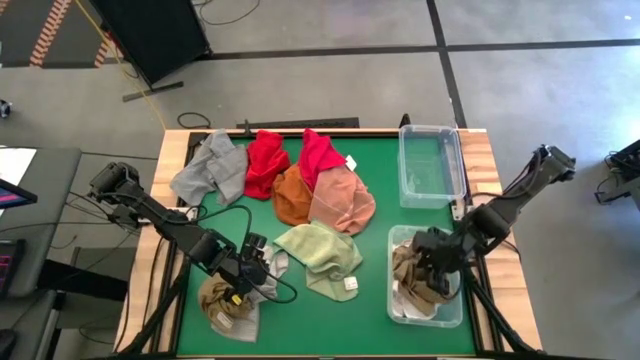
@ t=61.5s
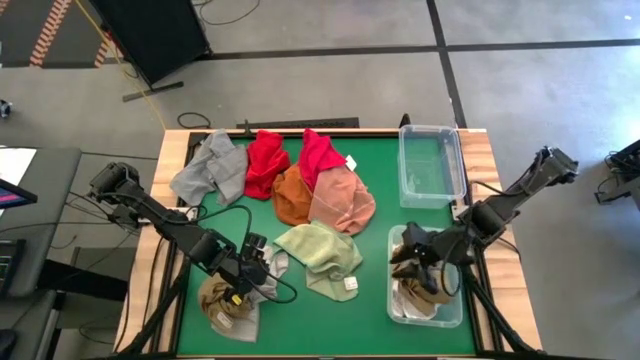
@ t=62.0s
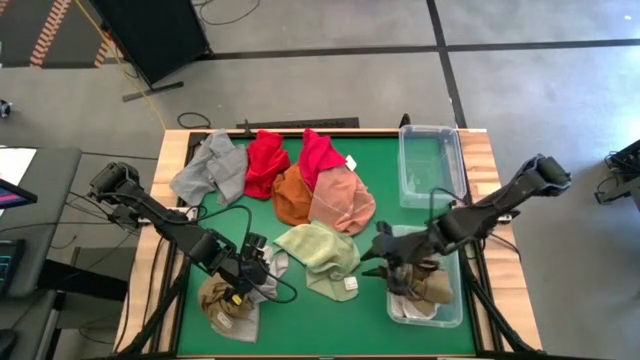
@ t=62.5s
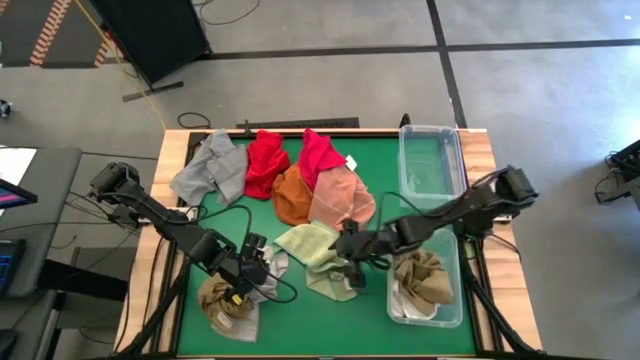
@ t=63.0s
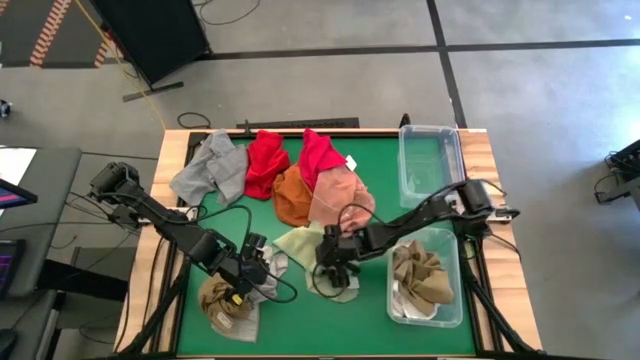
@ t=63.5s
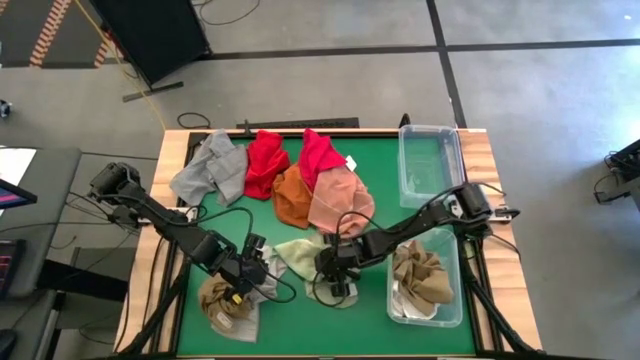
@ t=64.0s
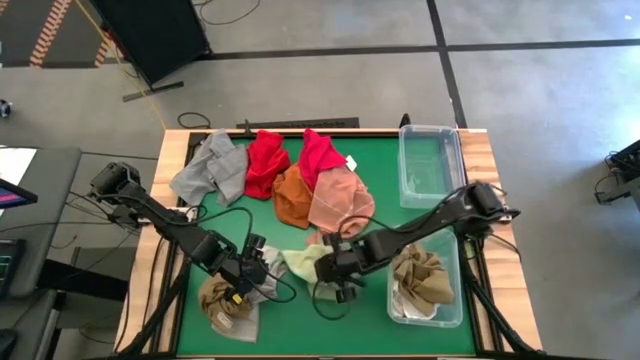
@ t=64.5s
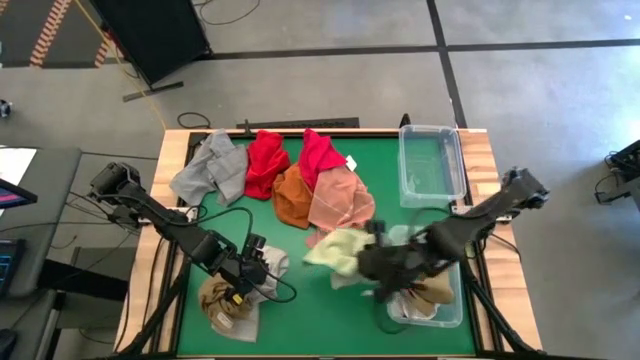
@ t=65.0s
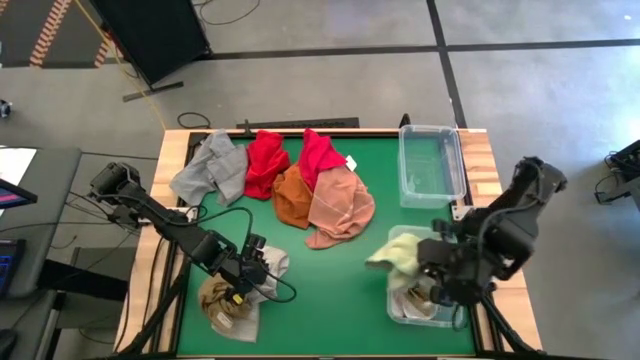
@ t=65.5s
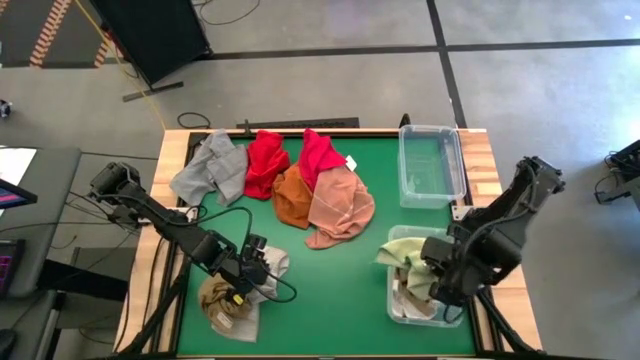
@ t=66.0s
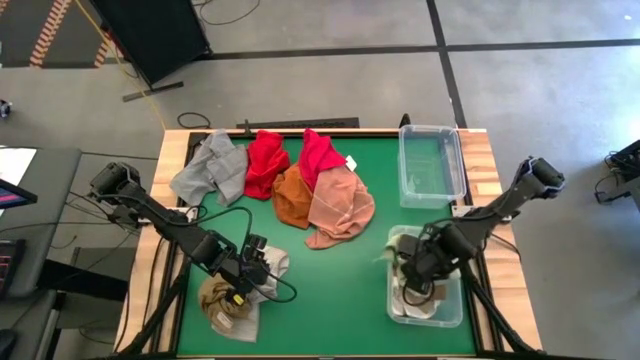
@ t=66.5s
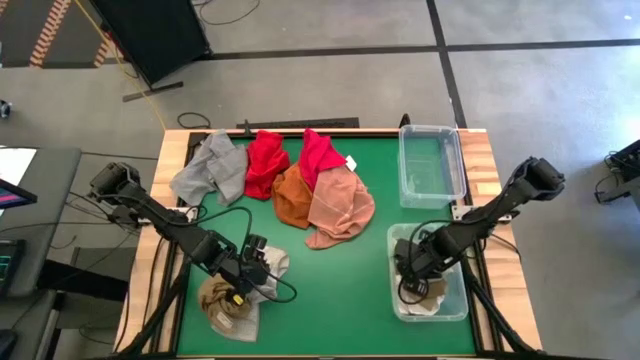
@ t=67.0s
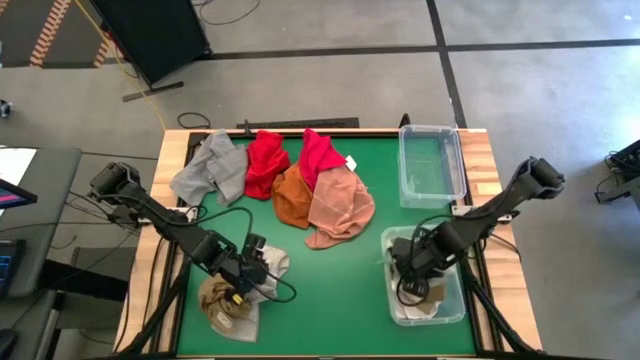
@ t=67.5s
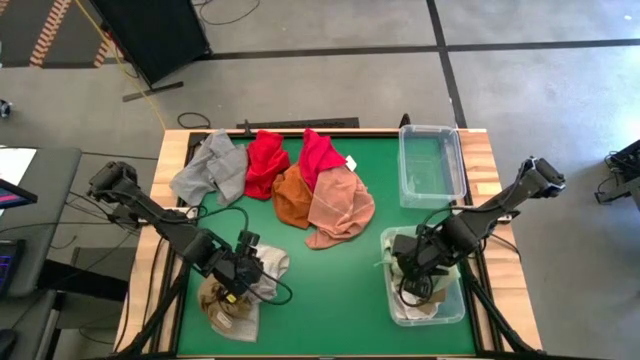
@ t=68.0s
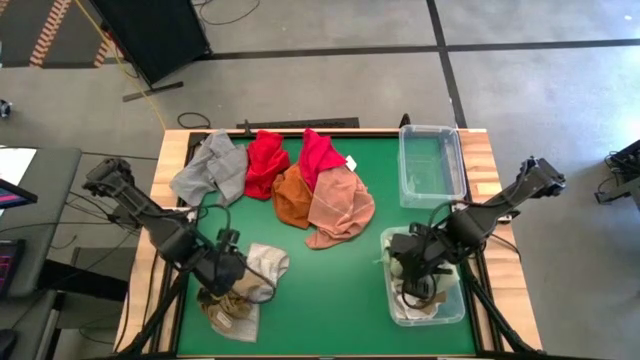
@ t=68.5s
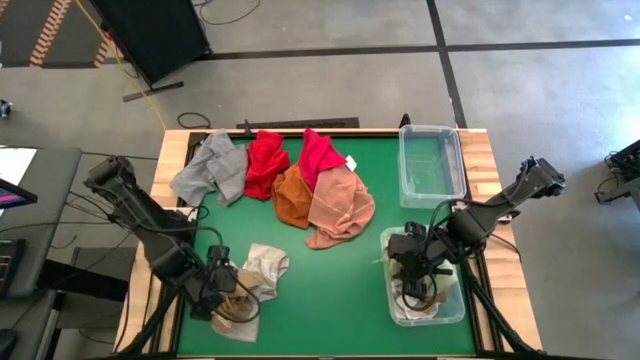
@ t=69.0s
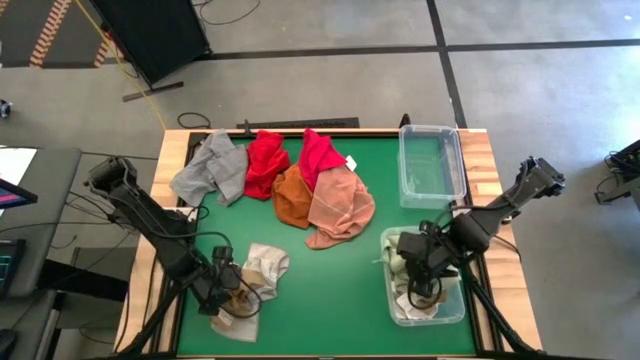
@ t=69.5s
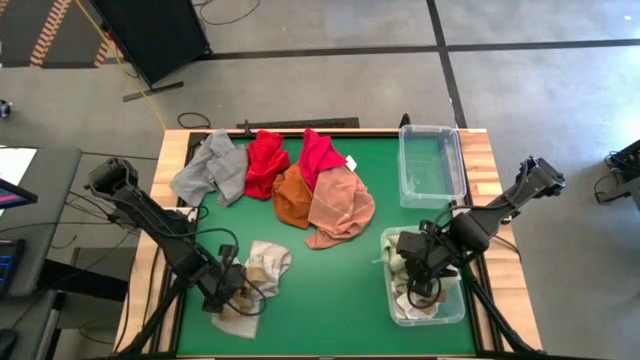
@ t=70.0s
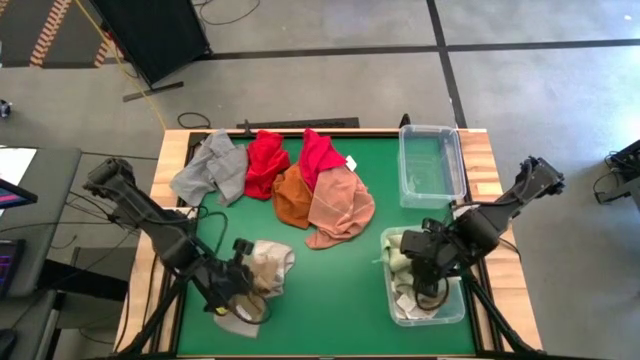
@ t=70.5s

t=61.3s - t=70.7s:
Task: Sort towels by color in basket
Put the green towel into the bottom transparent bin

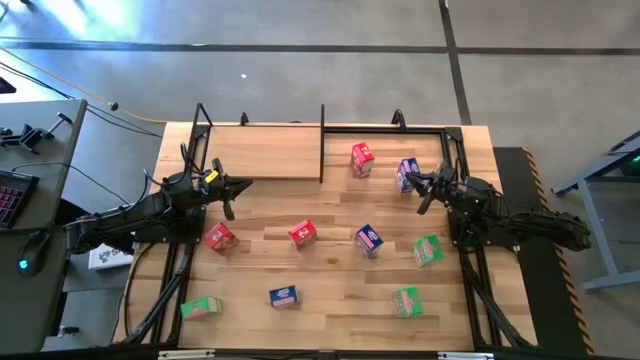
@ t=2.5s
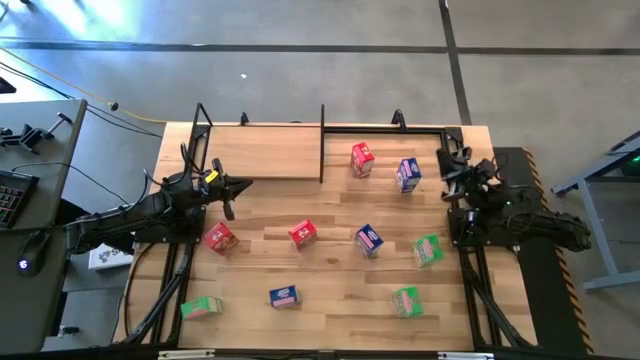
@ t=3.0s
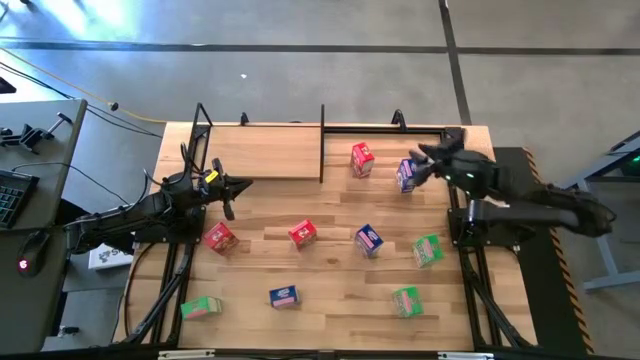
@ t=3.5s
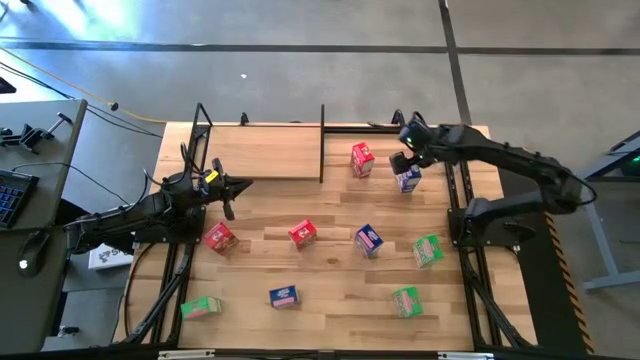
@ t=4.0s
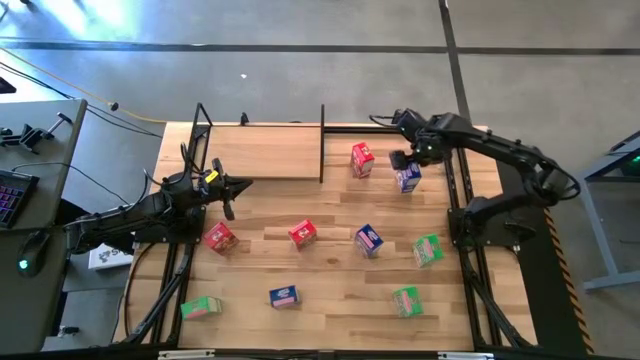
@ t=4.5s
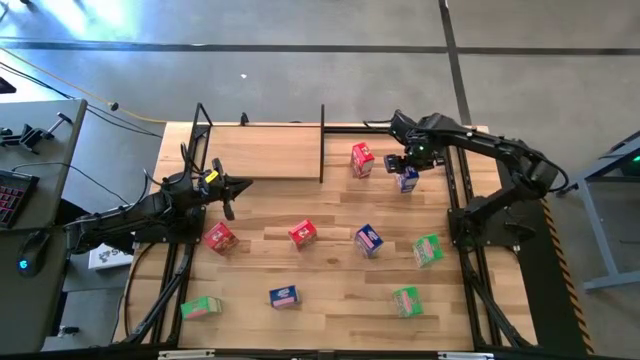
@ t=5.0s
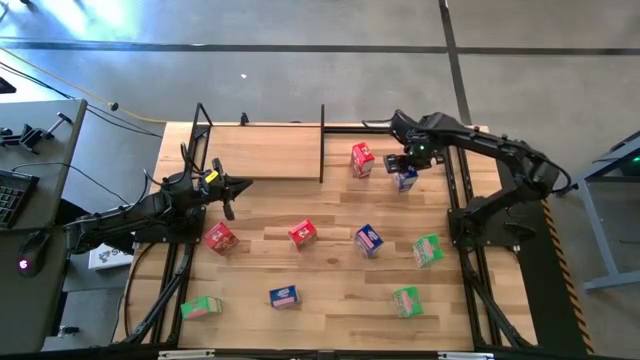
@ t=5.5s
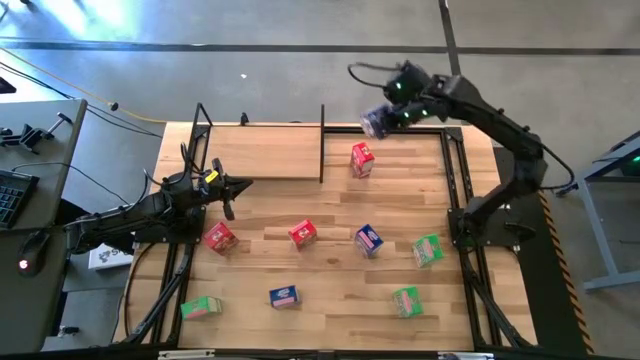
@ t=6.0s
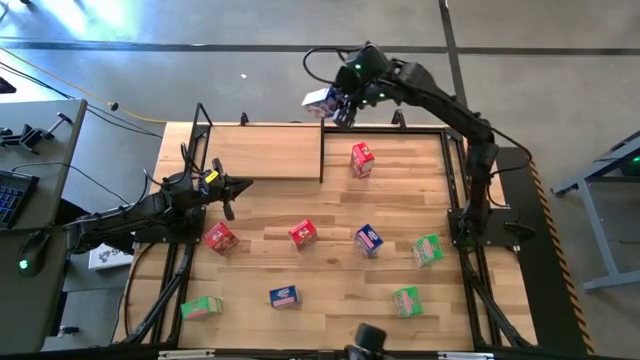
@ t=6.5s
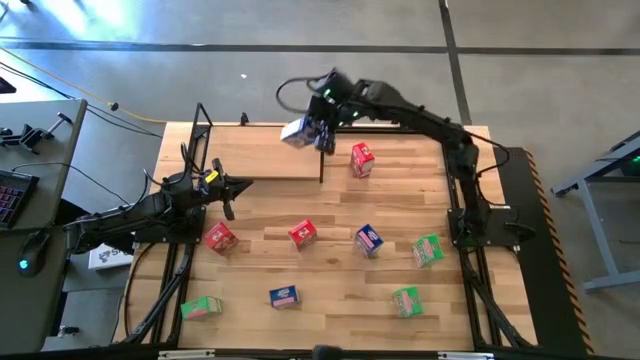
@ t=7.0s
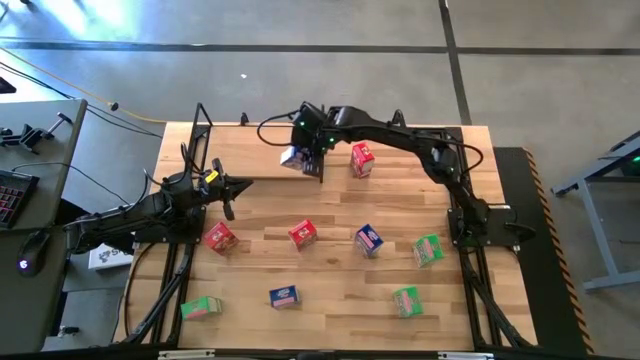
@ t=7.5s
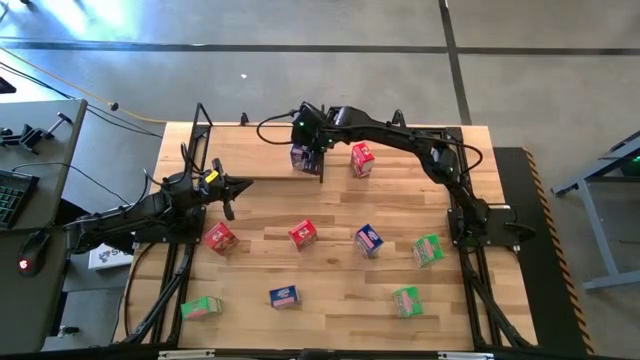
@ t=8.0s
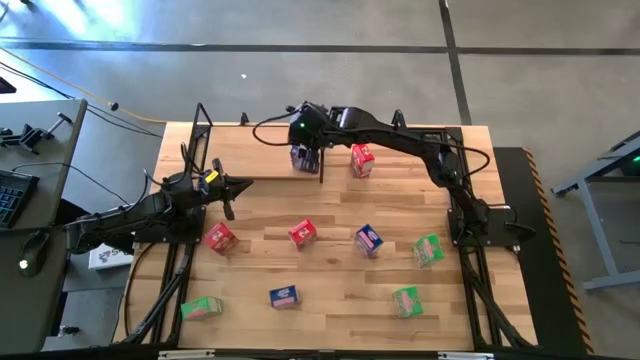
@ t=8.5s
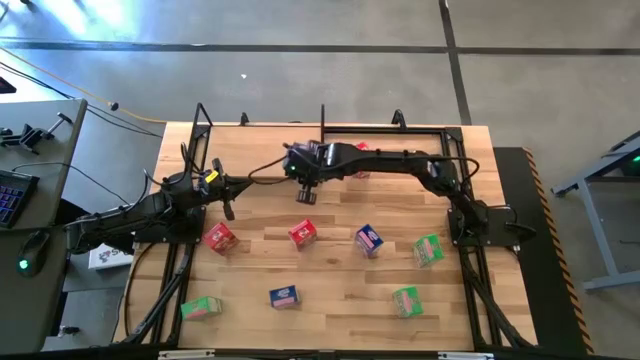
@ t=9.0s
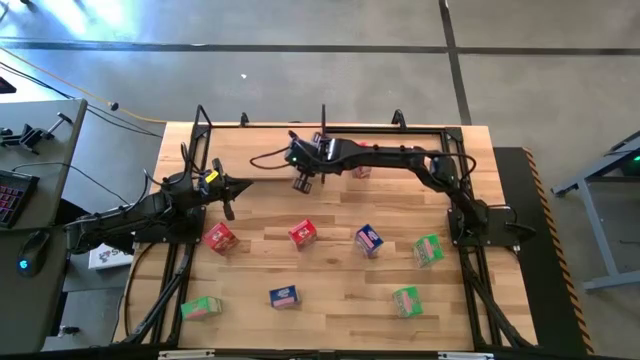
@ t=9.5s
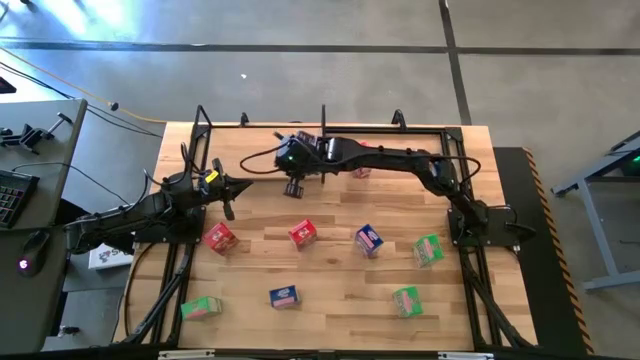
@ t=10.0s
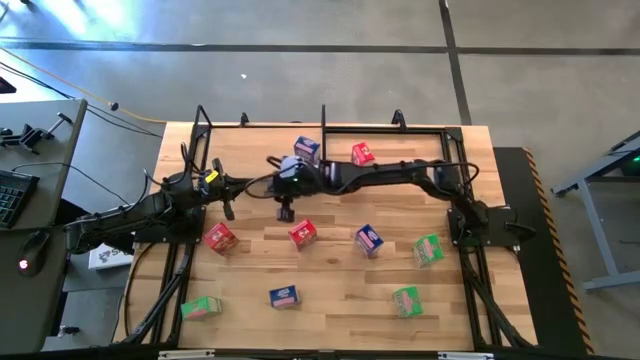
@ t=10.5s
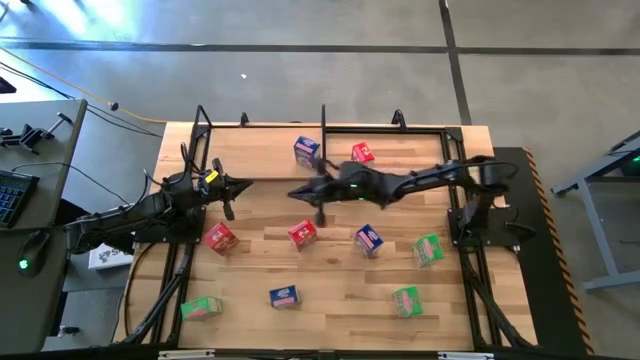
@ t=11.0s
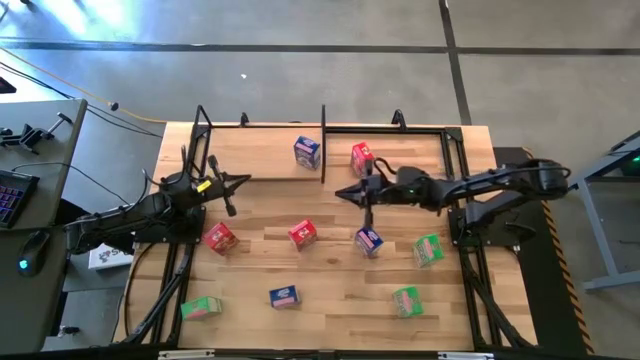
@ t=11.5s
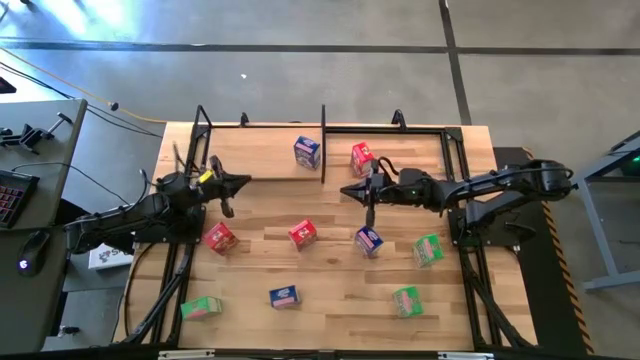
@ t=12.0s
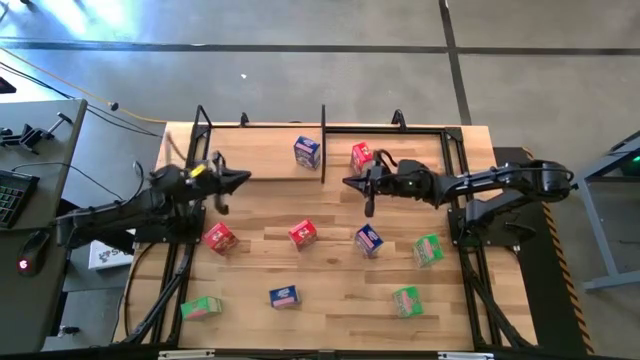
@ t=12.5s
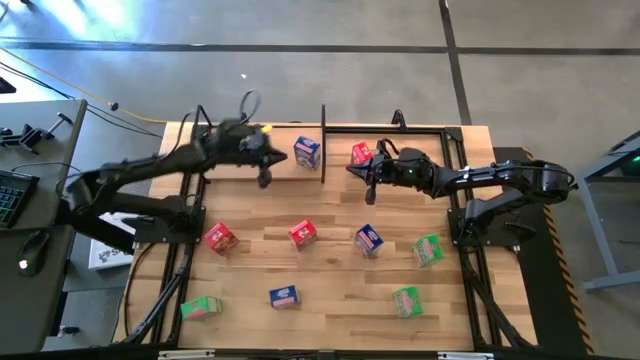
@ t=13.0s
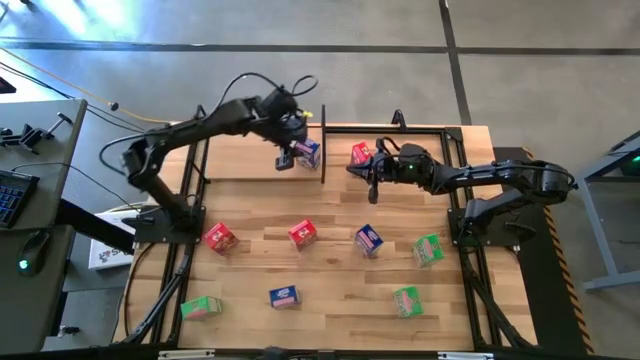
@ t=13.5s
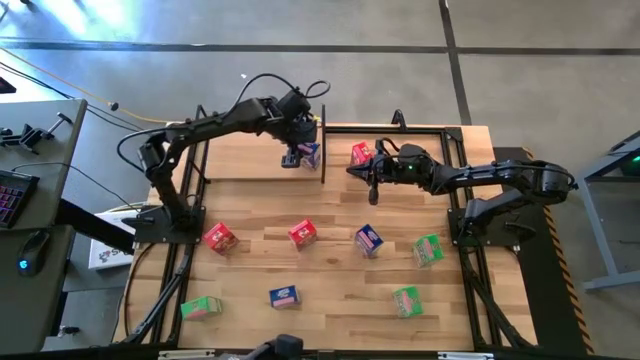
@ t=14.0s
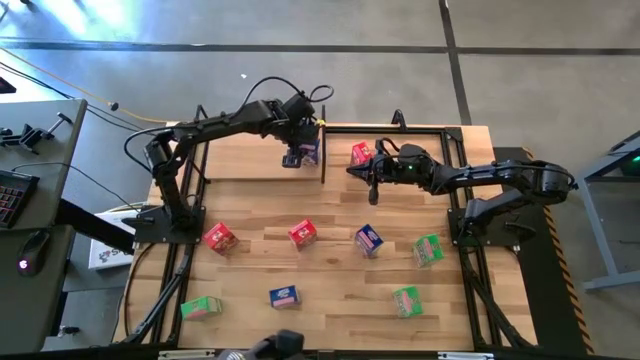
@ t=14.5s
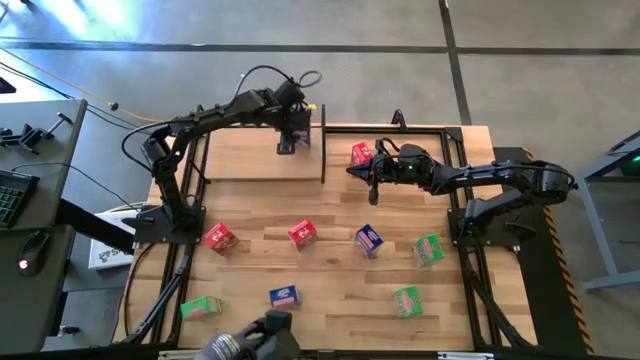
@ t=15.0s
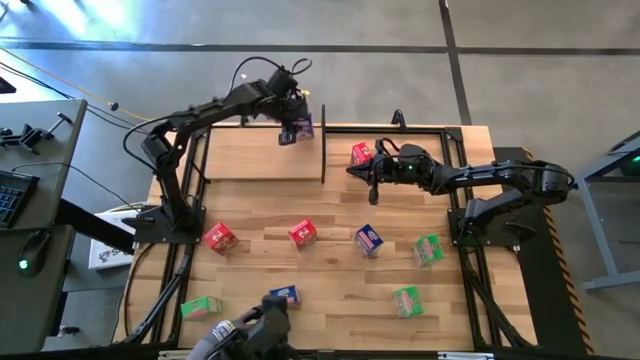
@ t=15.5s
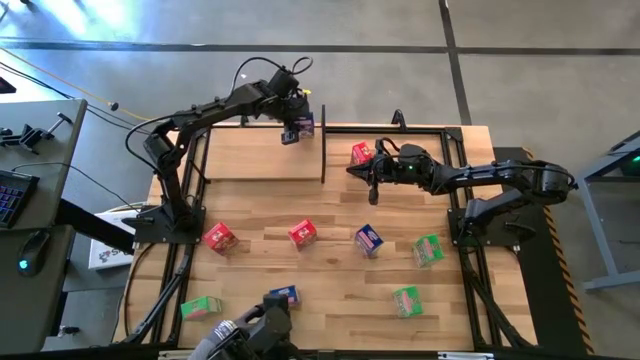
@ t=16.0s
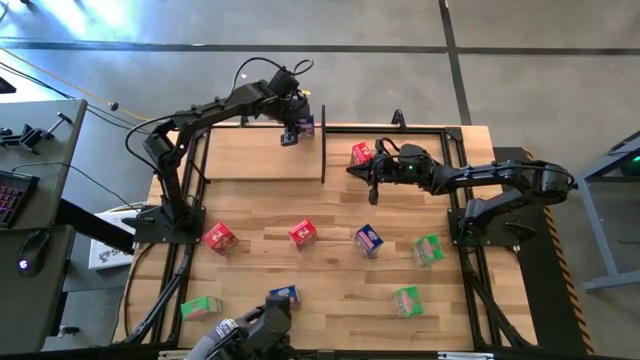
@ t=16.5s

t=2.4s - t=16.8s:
Task: Stack cereal on shelf
Put the top blue cereal box on the shelf
